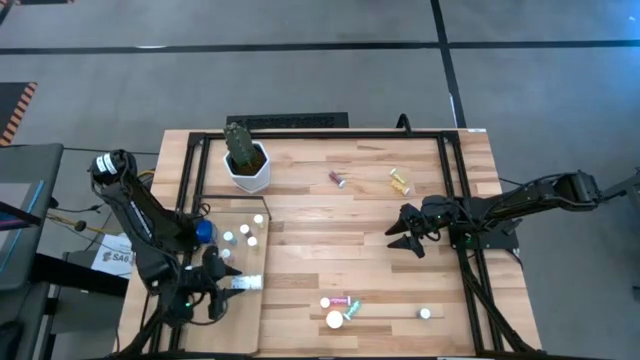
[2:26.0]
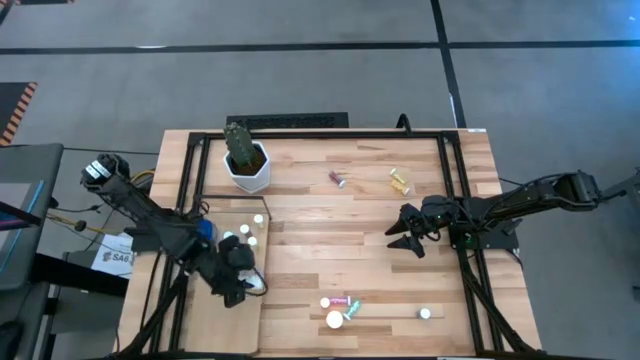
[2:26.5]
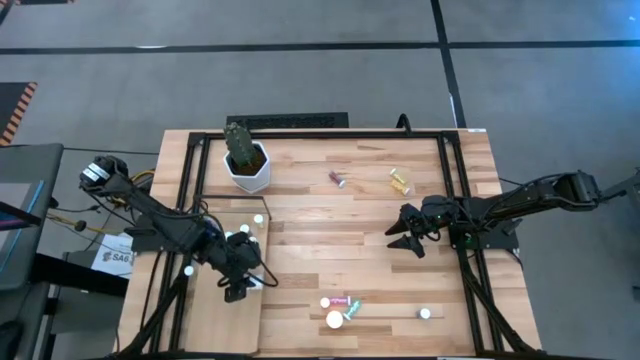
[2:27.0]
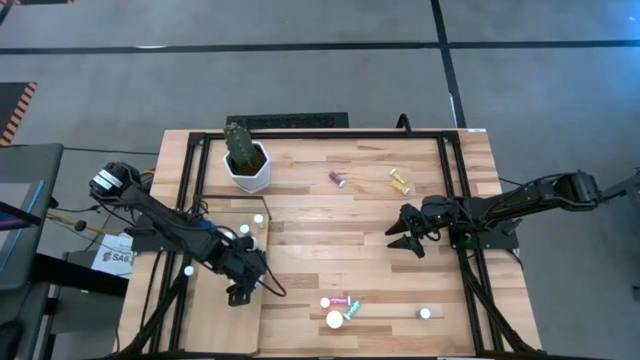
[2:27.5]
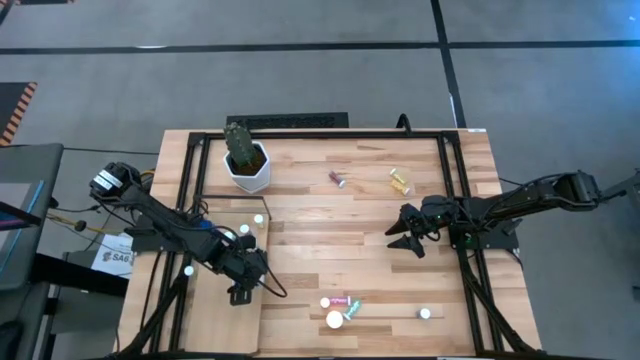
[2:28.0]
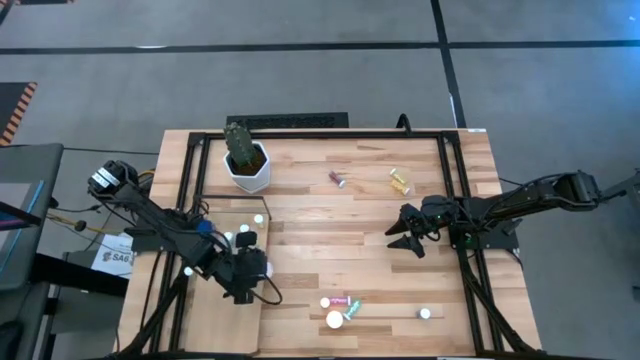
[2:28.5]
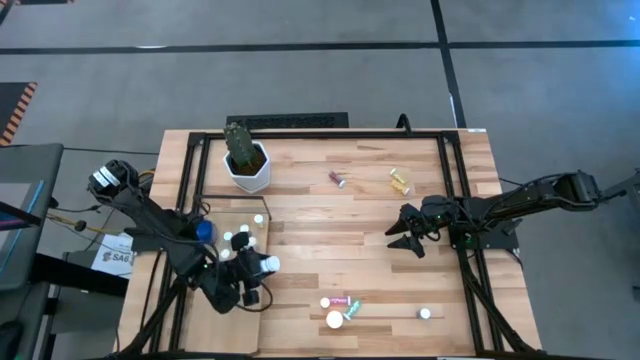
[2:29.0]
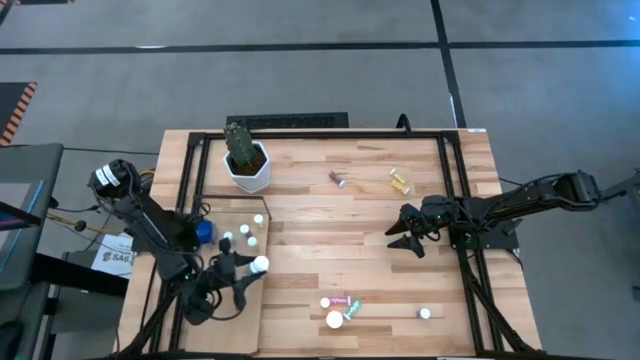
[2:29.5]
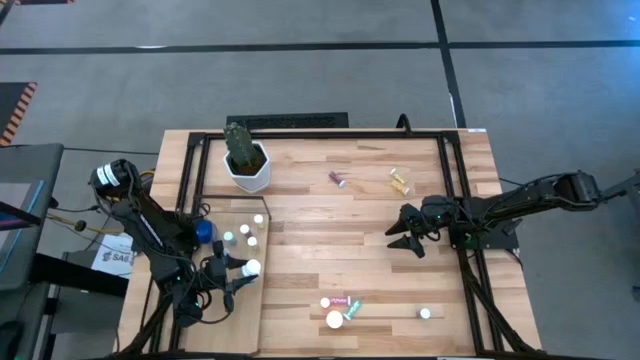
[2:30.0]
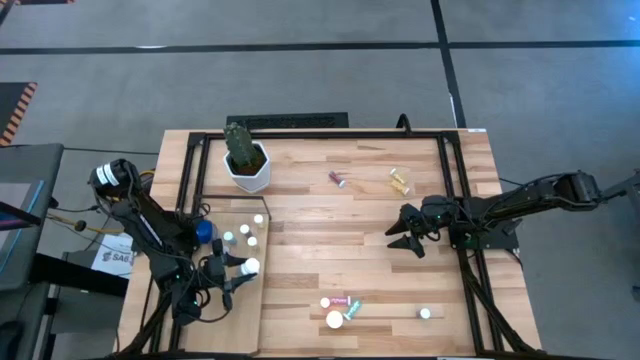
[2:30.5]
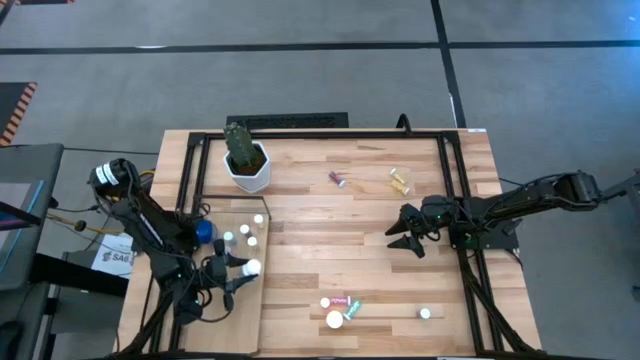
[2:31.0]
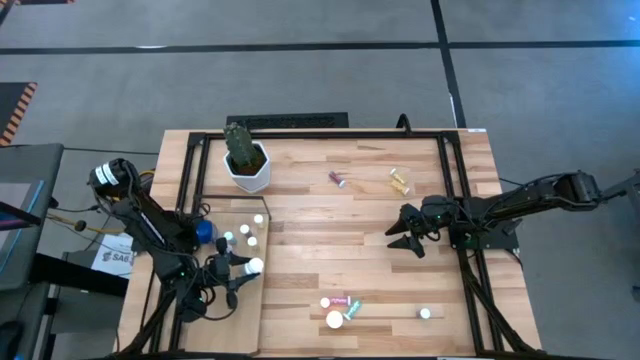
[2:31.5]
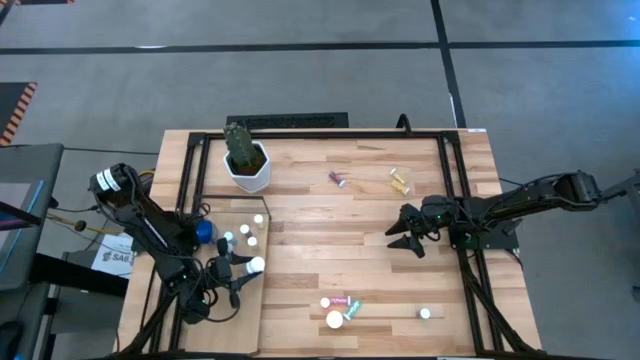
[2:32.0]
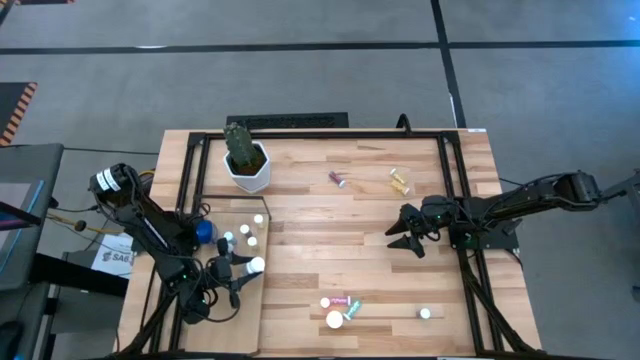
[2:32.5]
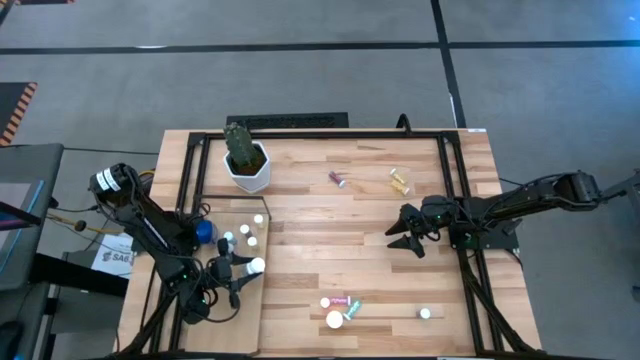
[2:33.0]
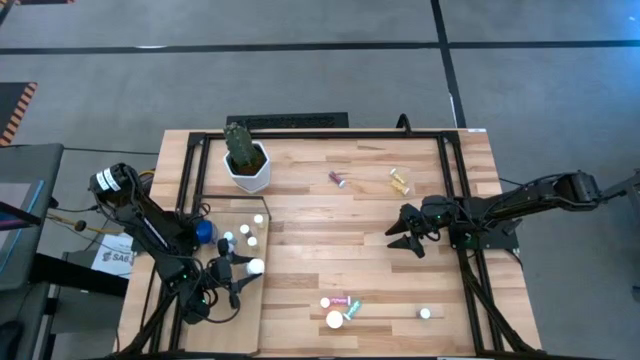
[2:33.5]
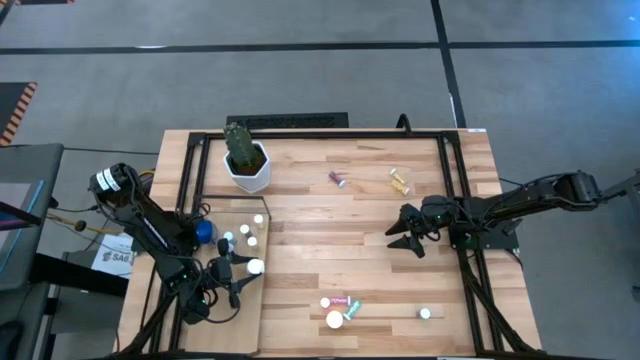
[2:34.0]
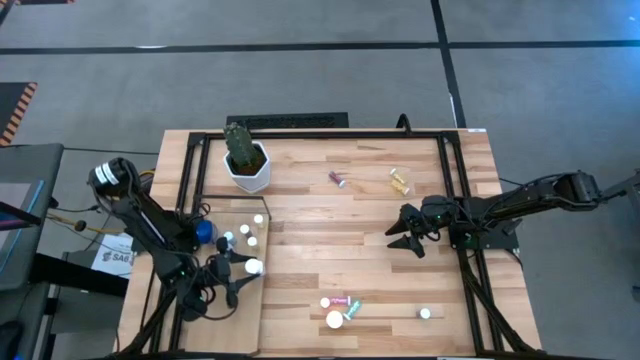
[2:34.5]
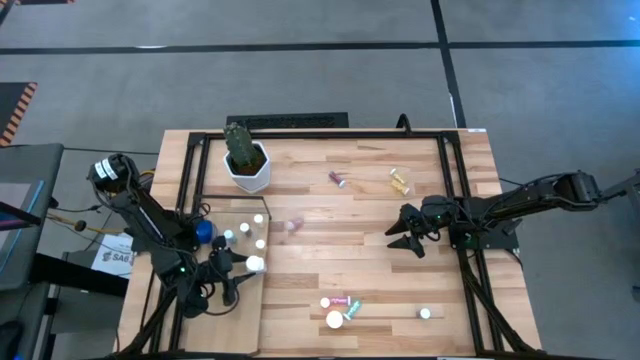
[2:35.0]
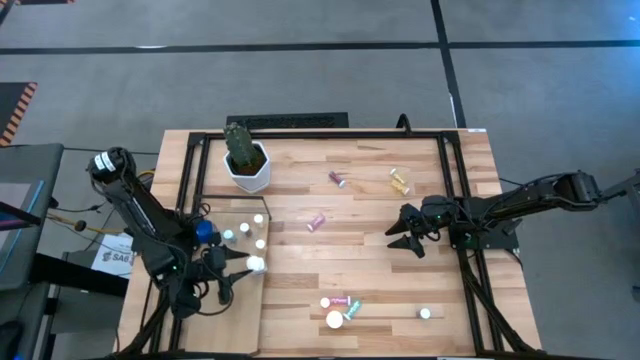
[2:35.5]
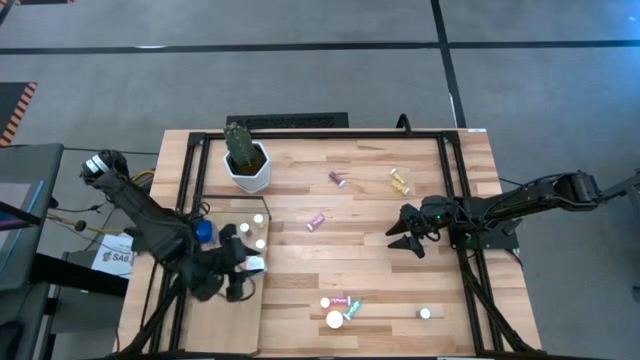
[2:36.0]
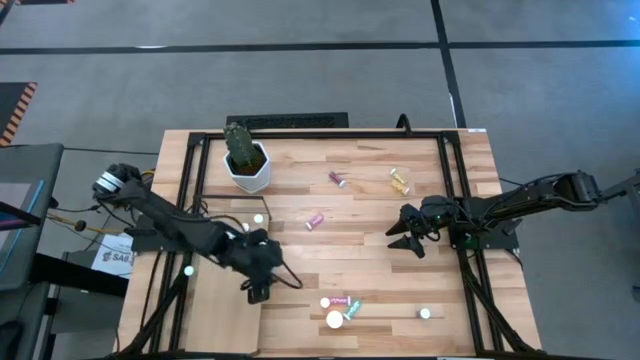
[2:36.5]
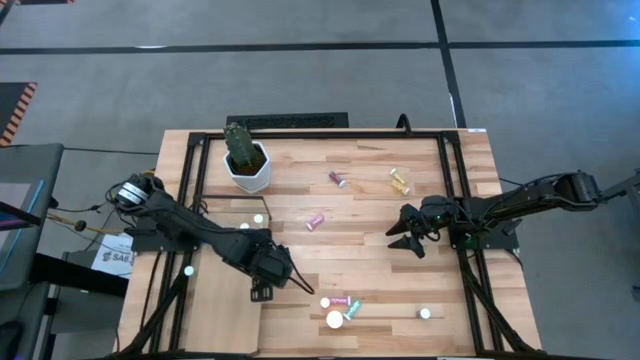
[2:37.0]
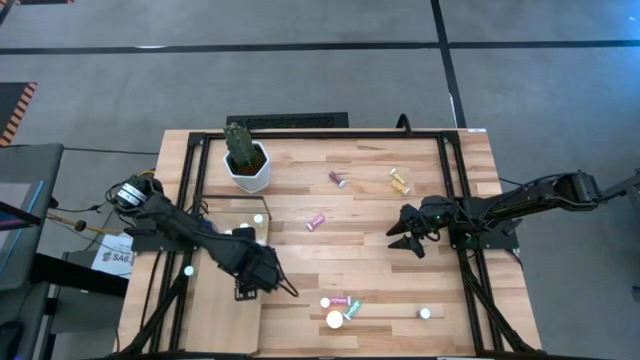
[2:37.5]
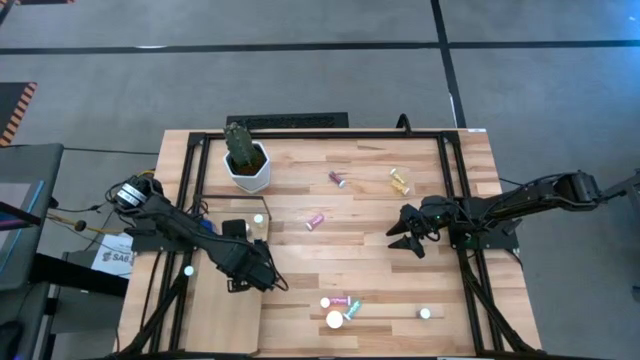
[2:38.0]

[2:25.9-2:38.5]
Task: Pick and place medicine bottles onto shelf by color
Put the white pill bottle on the shelf

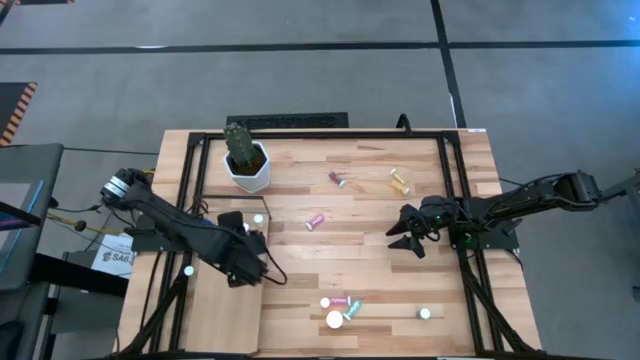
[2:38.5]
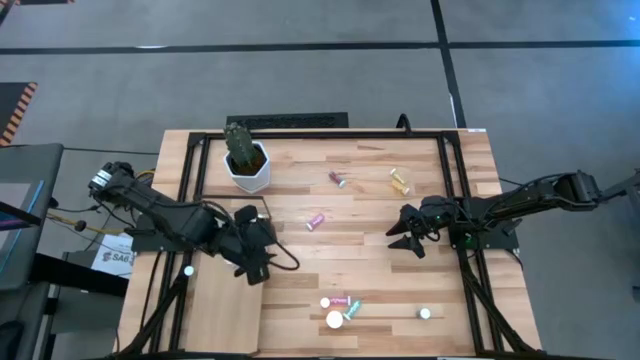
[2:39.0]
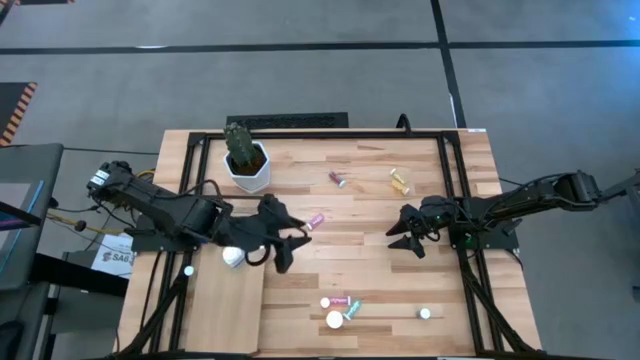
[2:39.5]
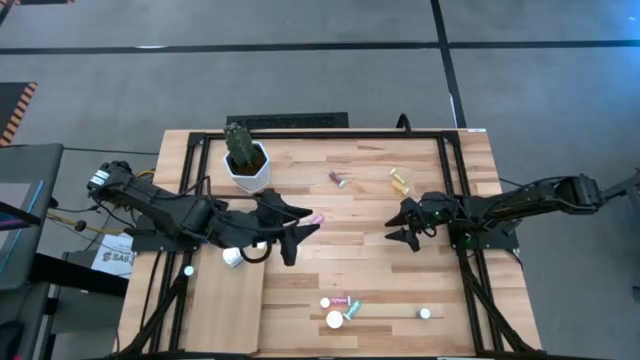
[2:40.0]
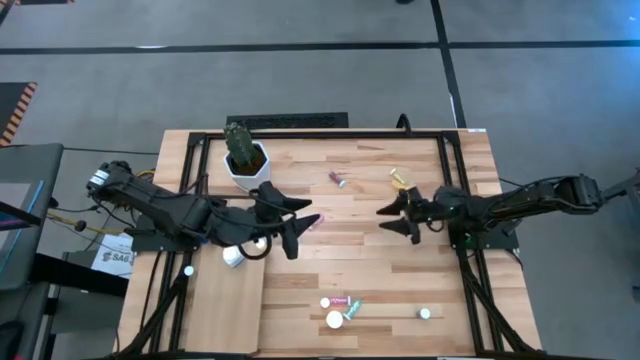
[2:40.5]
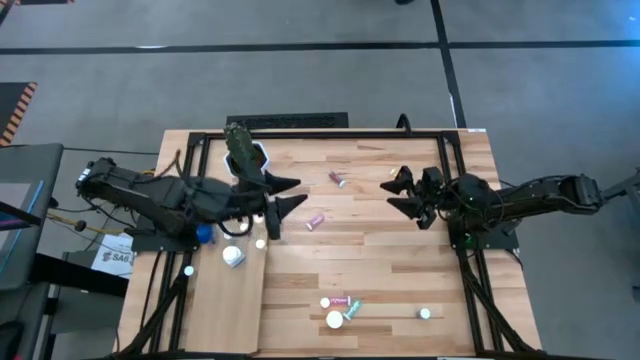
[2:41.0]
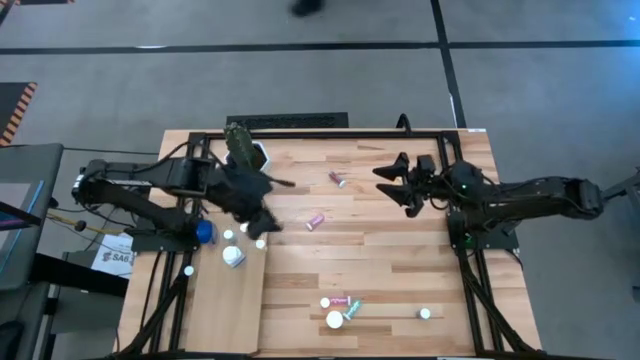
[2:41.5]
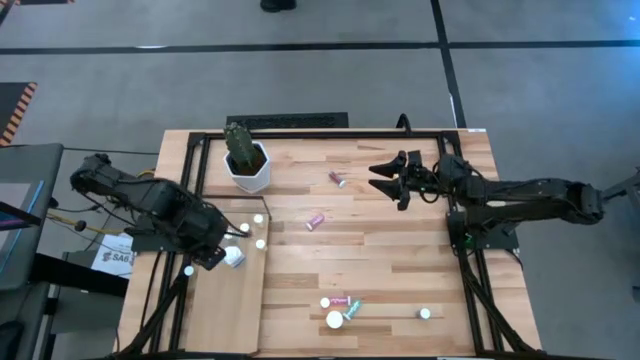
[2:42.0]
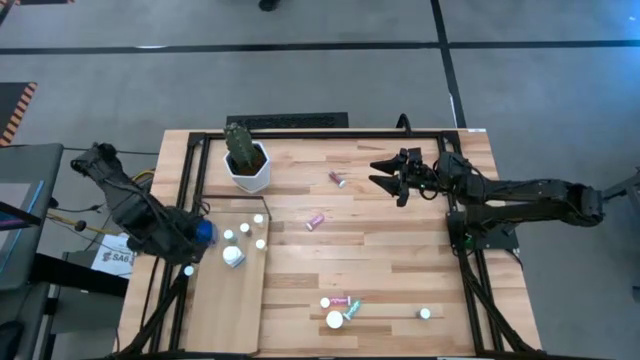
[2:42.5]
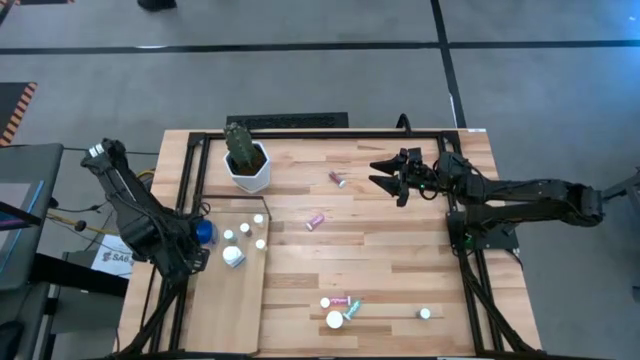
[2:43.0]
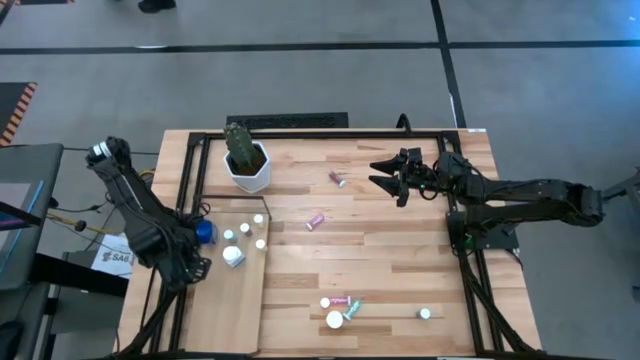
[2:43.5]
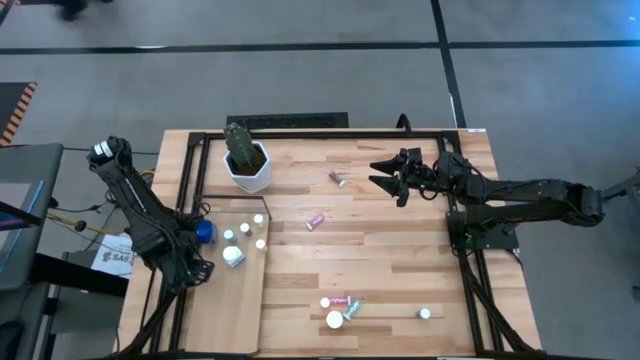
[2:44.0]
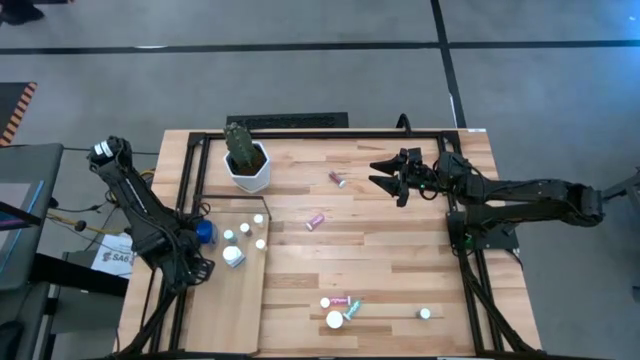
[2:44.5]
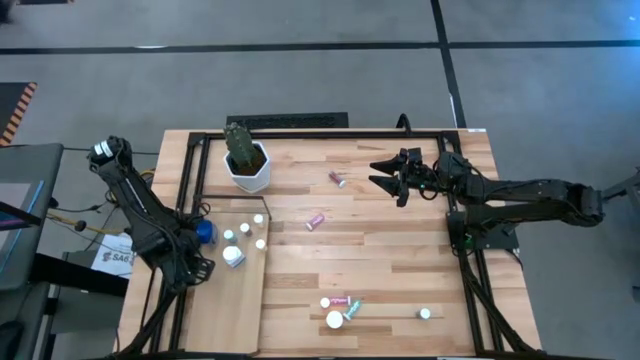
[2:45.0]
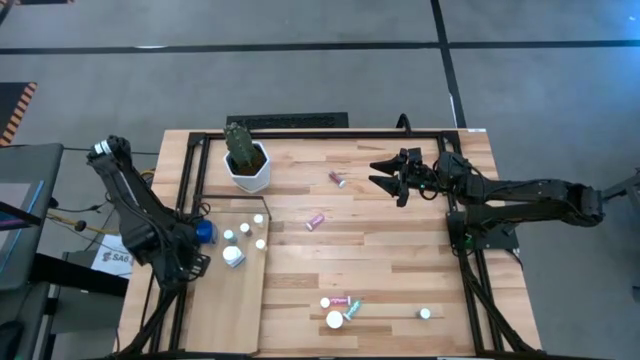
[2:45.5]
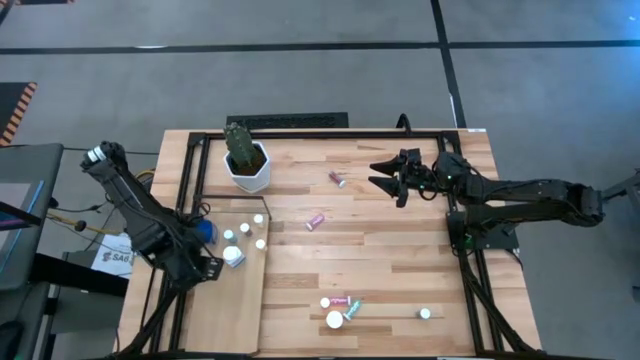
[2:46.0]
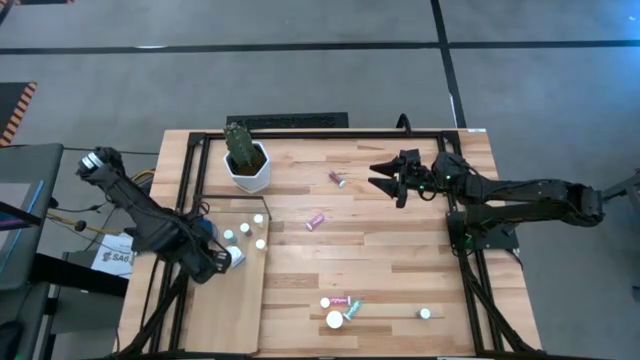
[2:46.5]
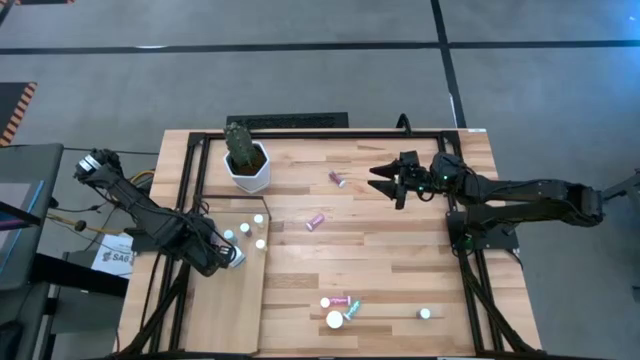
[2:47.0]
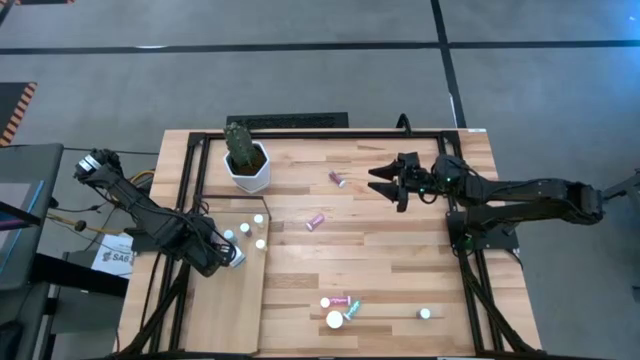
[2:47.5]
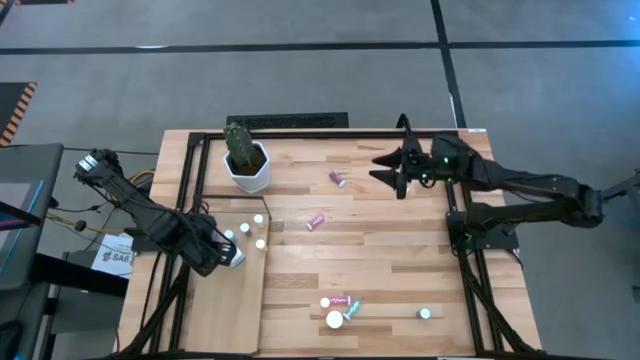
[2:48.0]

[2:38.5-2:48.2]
Put the yellow pill bottle on the shelf
